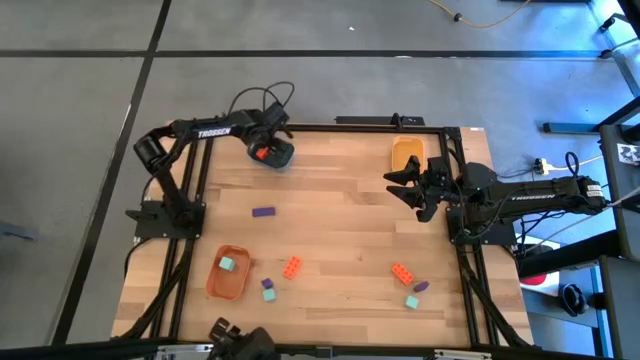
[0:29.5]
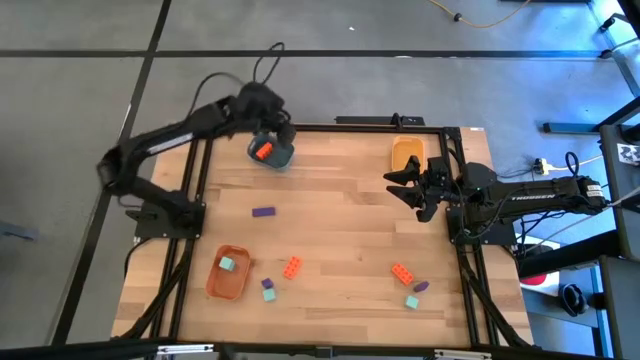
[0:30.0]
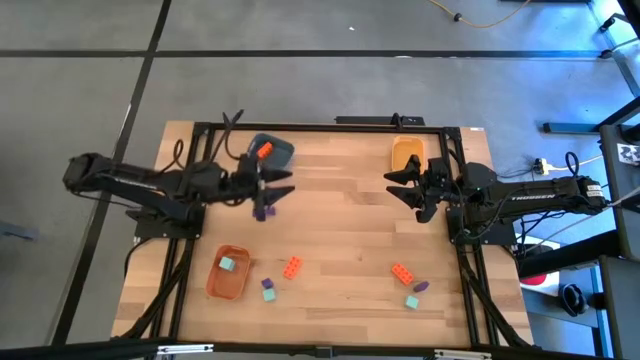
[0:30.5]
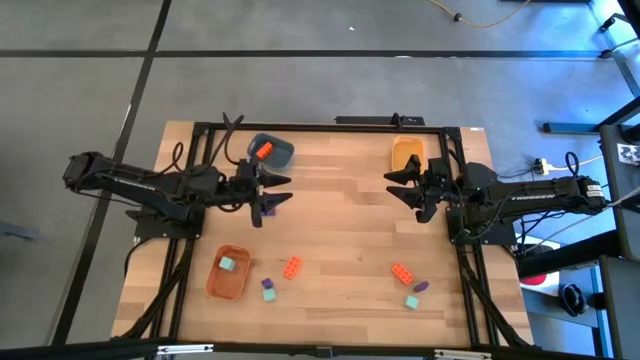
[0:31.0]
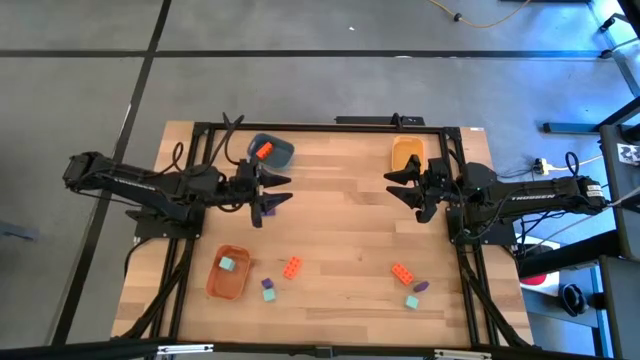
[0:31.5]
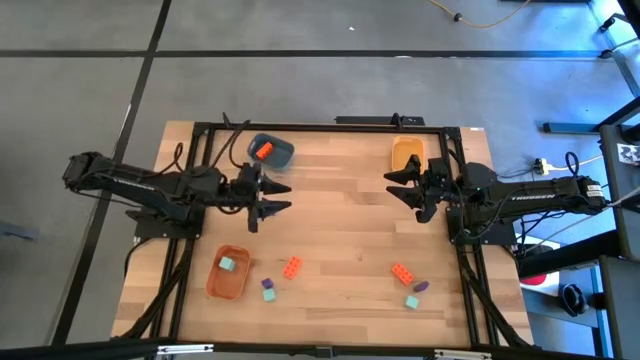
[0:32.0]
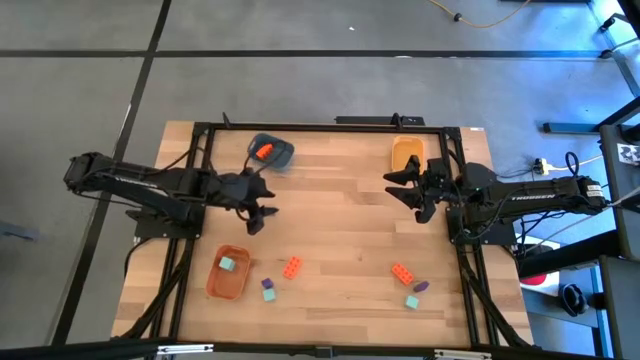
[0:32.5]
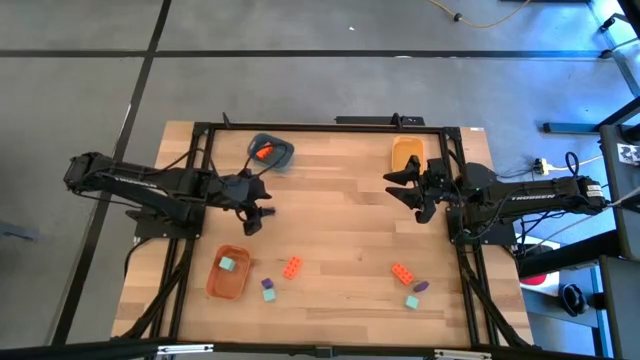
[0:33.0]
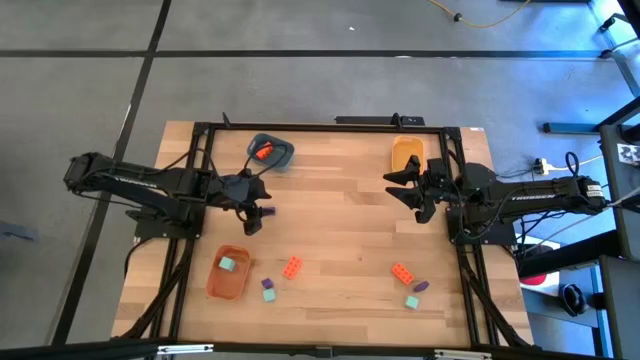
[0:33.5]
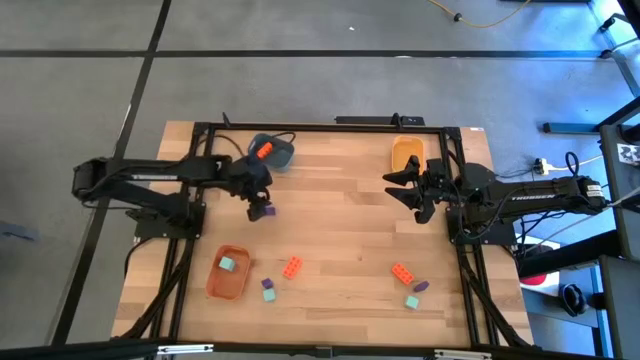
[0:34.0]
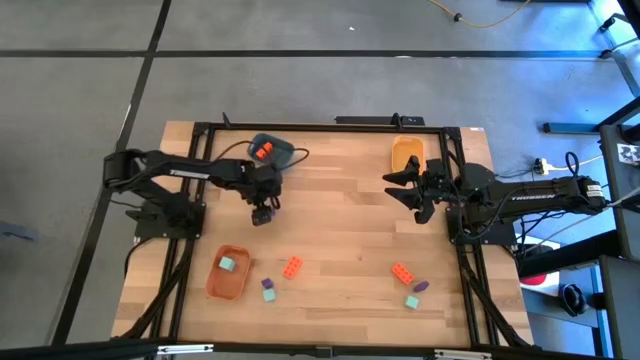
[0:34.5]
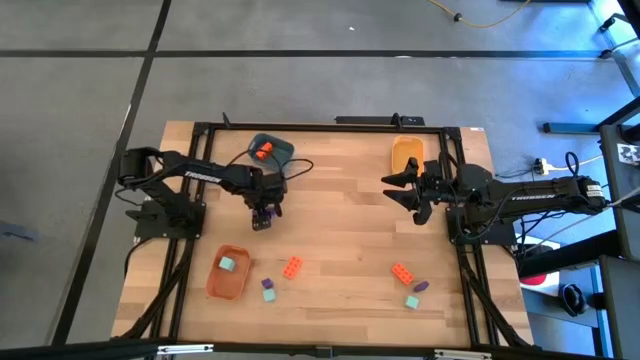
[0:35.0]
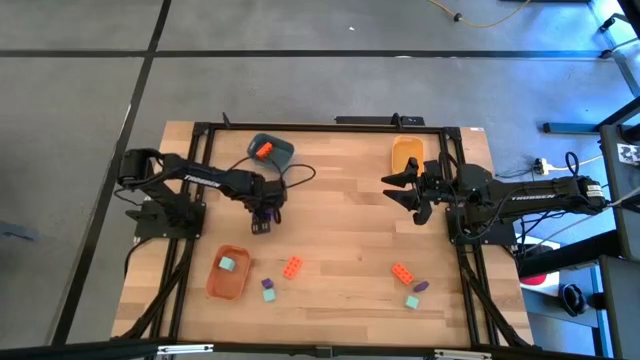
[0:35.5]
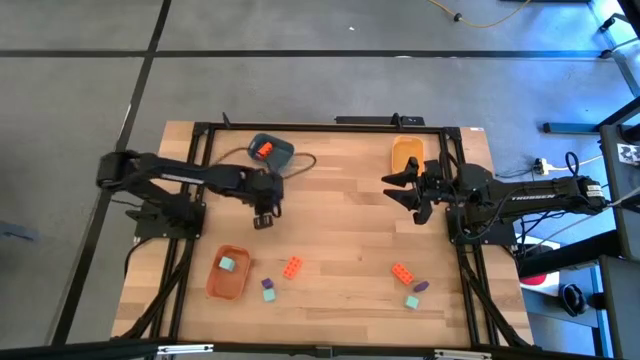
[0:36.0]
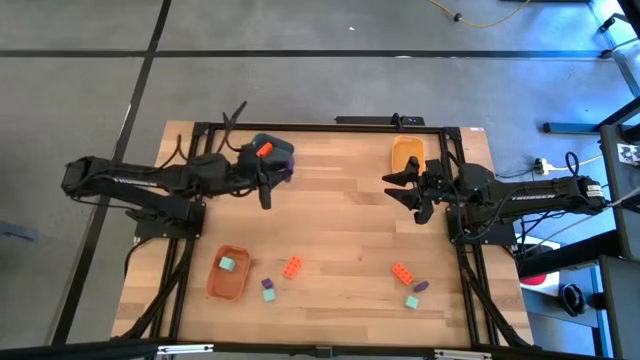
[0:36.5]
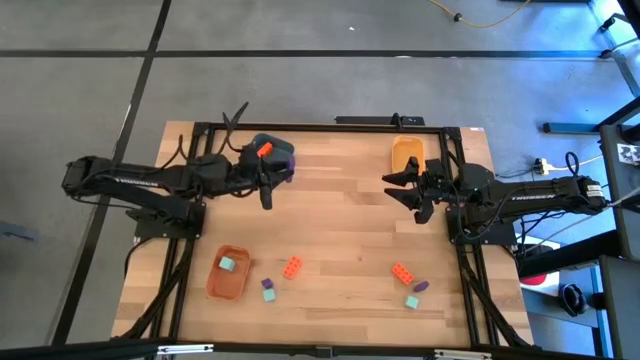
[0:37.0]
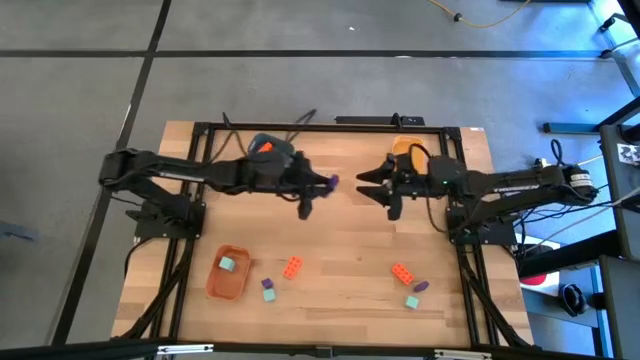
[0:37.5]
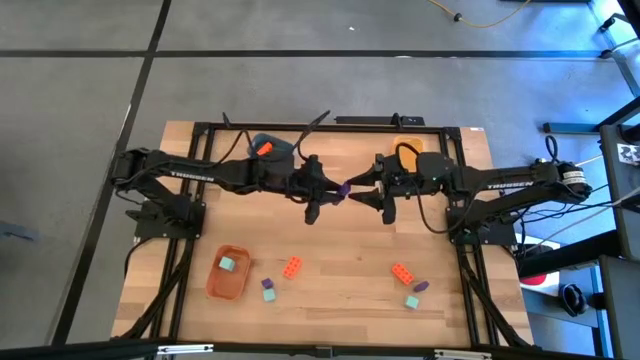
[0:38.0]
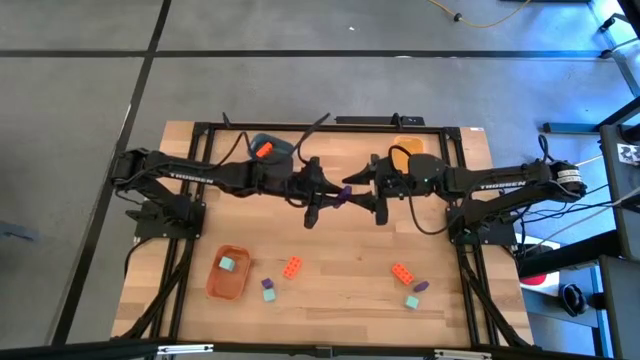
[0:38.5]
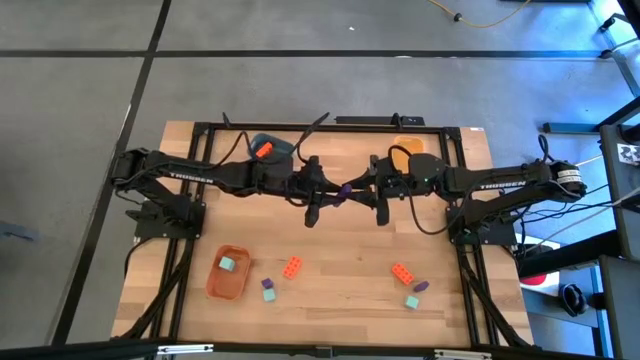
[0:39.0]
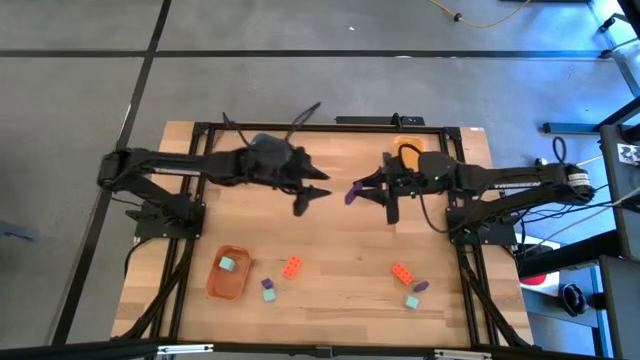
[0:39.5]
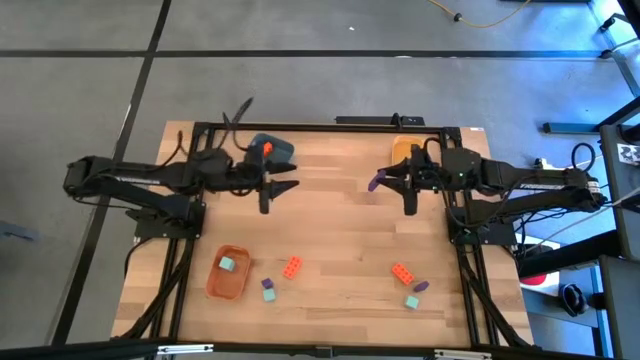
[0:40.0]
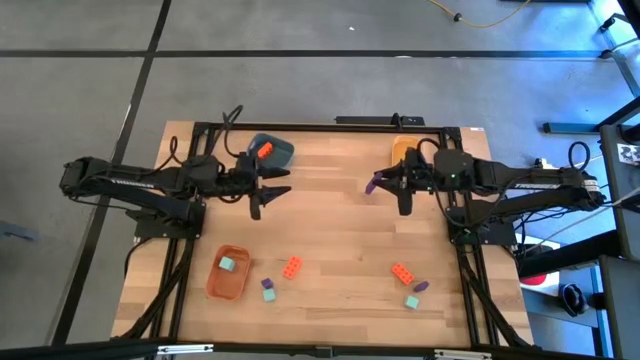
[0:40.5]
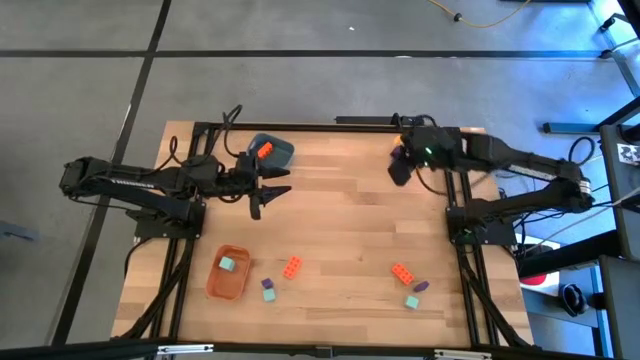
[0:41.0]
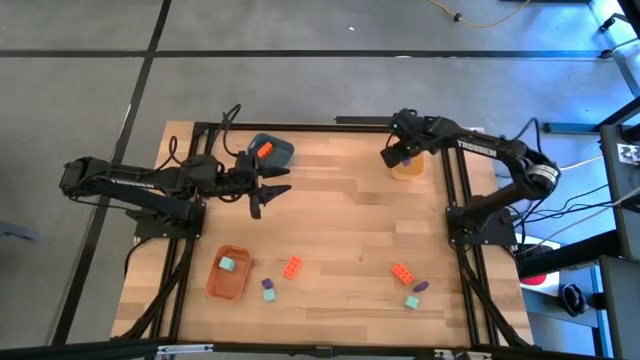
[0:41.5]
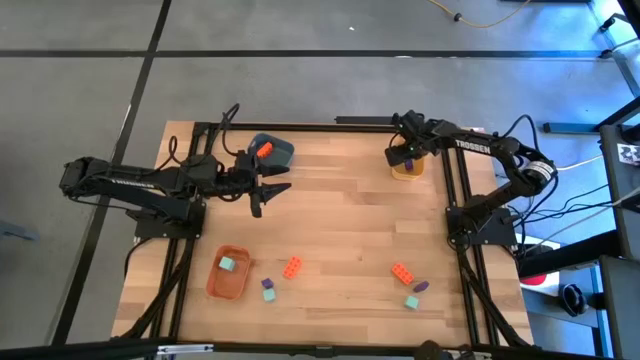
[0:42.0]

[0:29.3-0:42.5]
Task: Sort & place blocks by color
Put the top blue block into the yellow bin

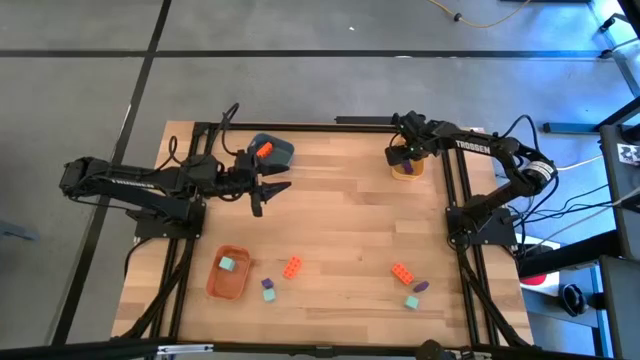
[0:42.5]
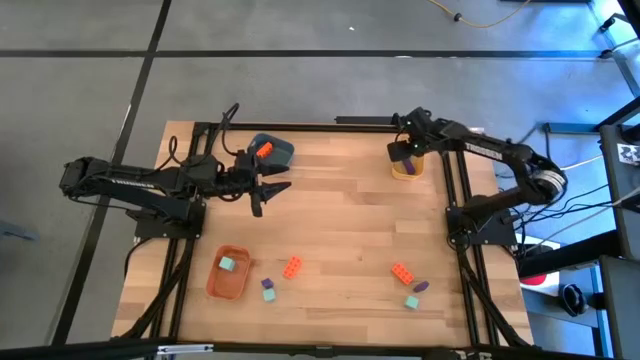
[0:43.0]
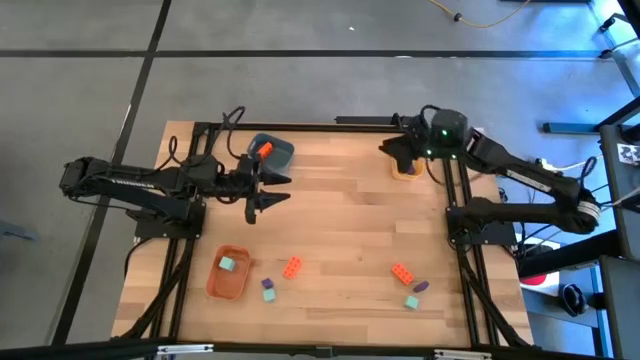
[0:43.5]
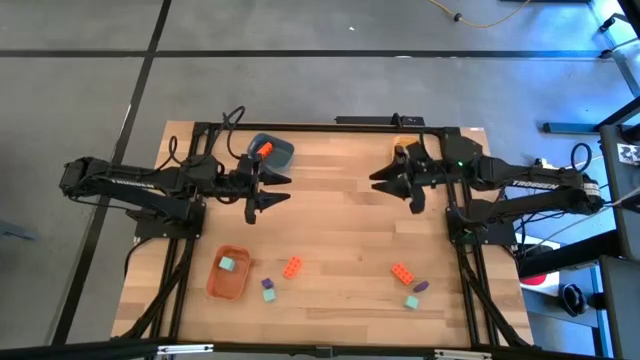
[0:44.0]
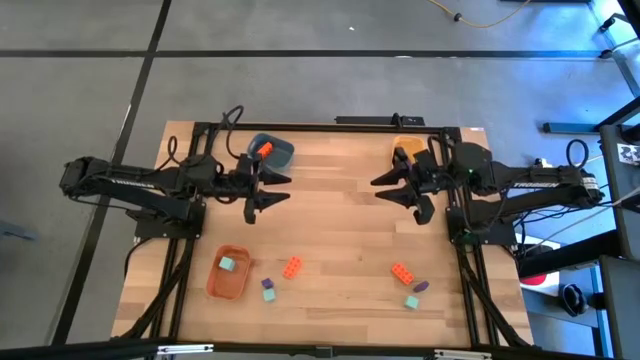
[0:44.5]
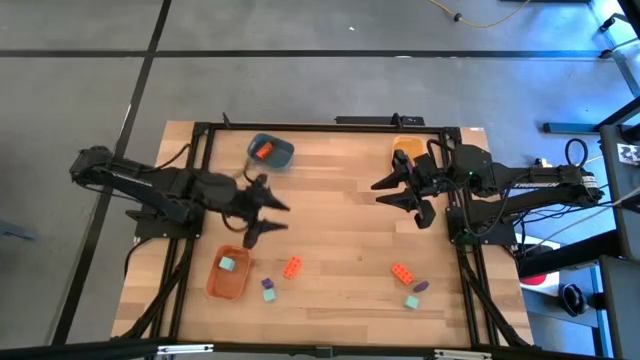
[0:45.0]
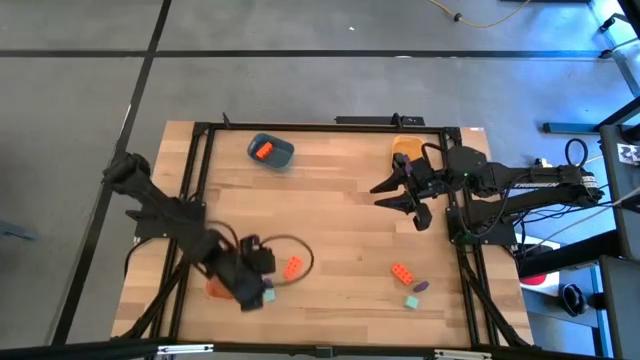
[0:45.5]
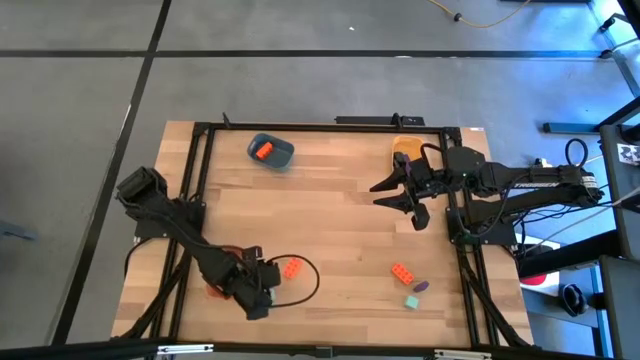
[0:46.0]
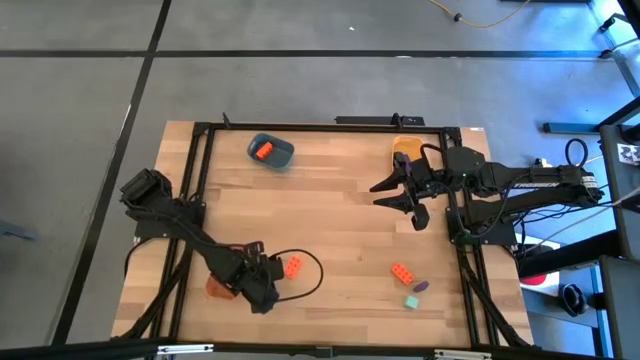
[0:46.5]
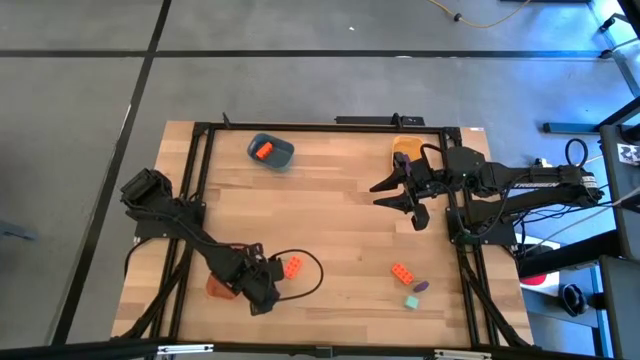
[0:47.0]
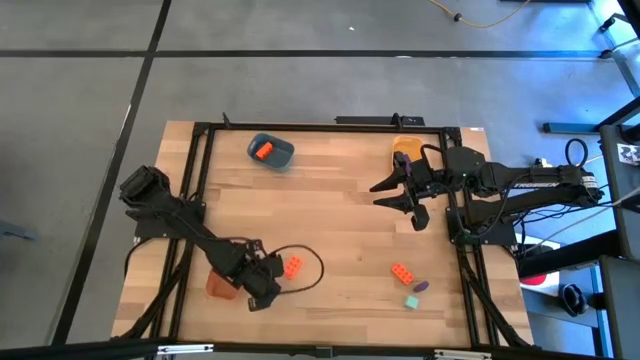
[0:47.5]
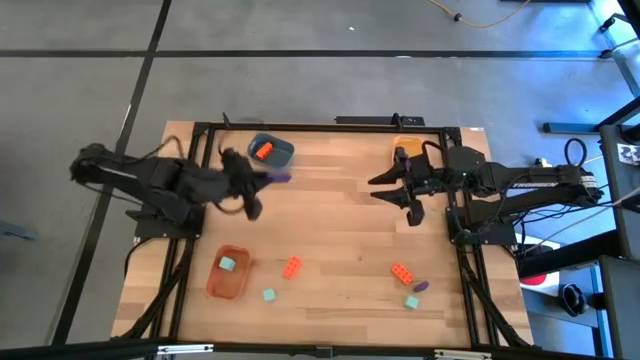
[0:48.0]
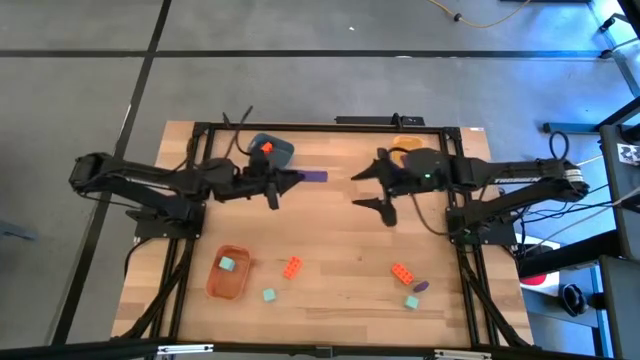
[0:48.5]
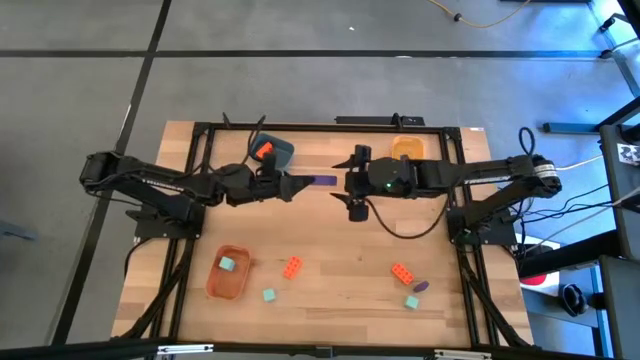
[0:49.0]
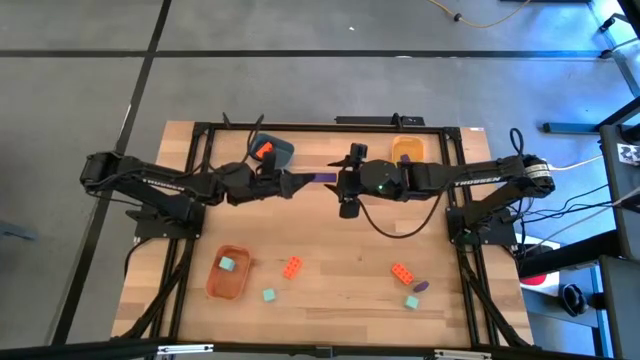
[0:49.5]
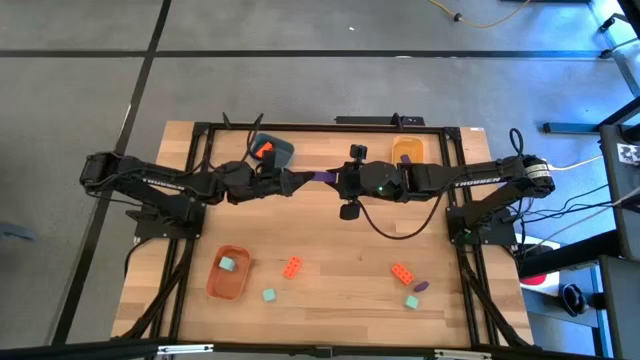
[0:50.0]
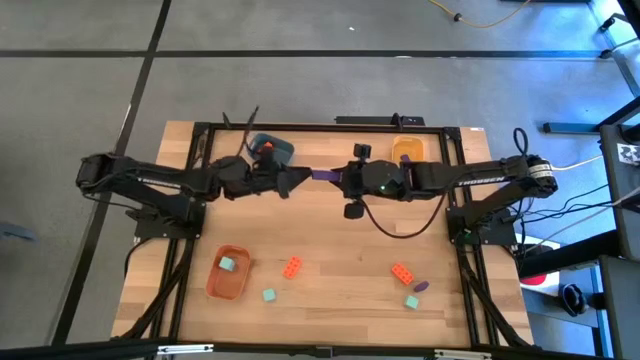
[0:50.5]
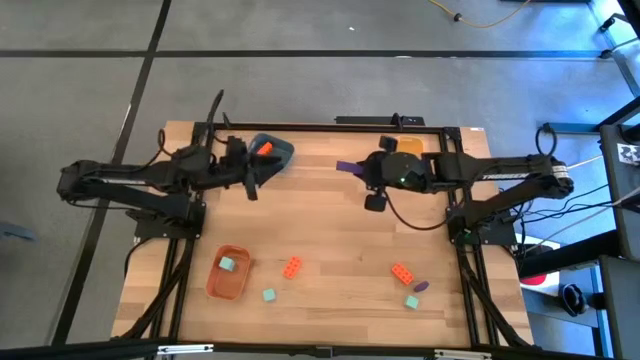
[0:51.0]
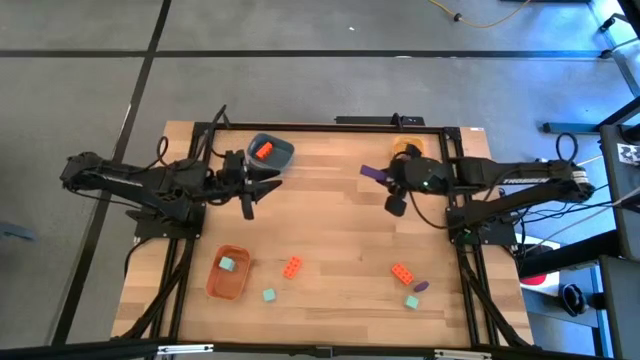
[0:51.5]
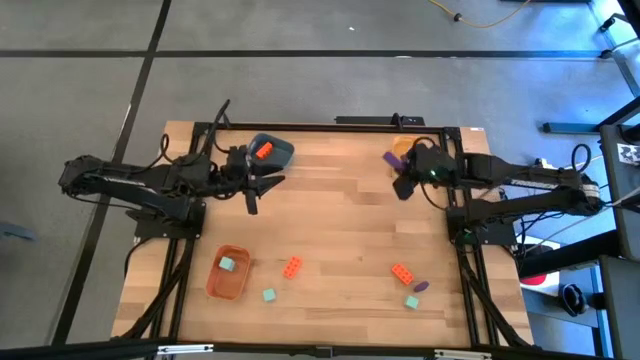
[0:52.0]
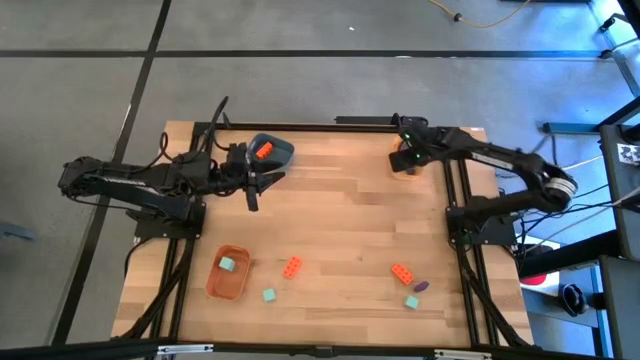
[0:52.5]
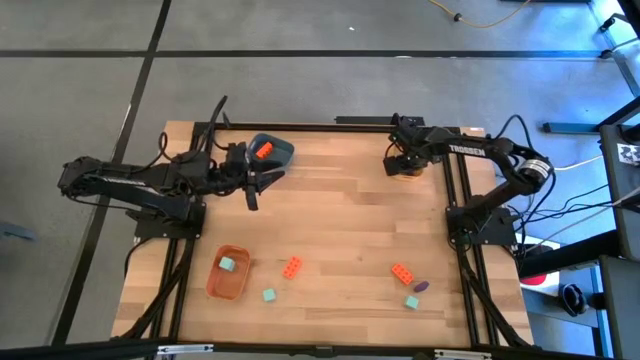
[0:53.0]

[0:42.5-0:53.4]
Put the left blue block into the yellow bin
